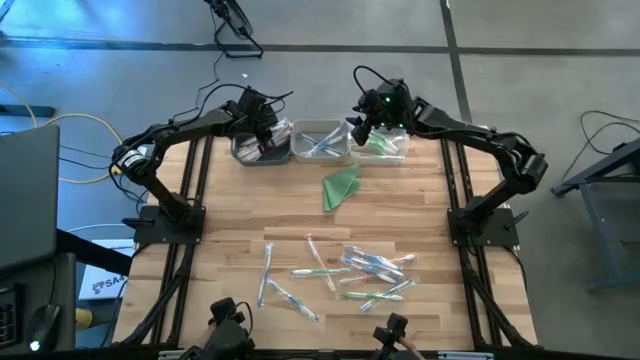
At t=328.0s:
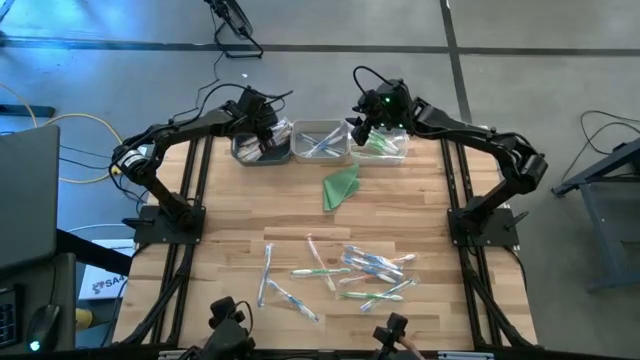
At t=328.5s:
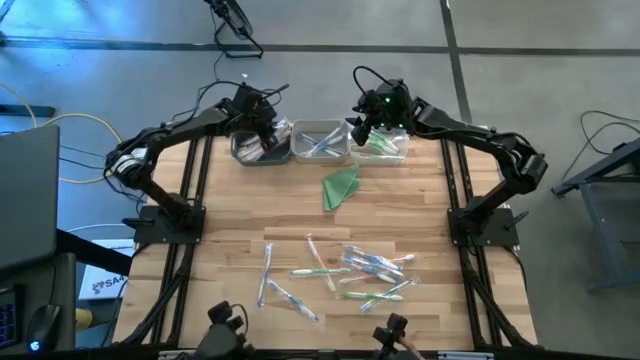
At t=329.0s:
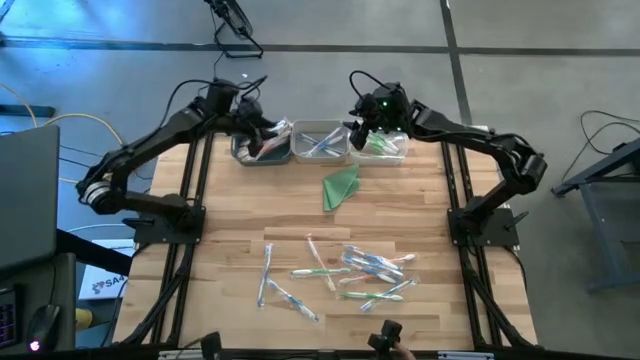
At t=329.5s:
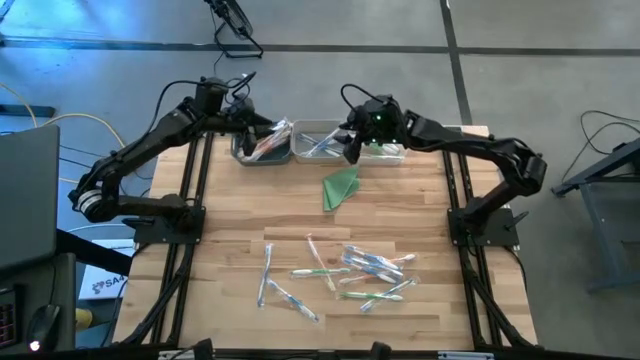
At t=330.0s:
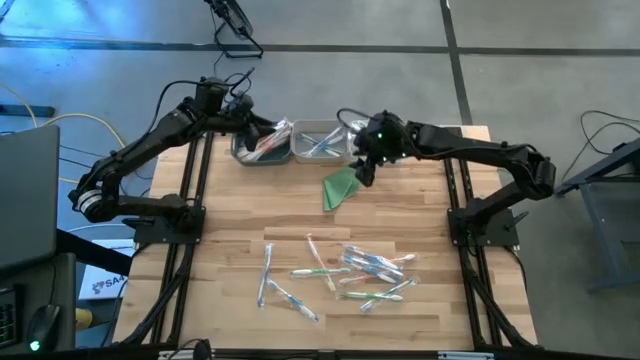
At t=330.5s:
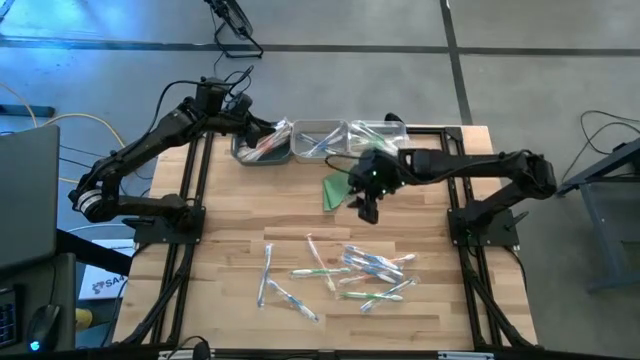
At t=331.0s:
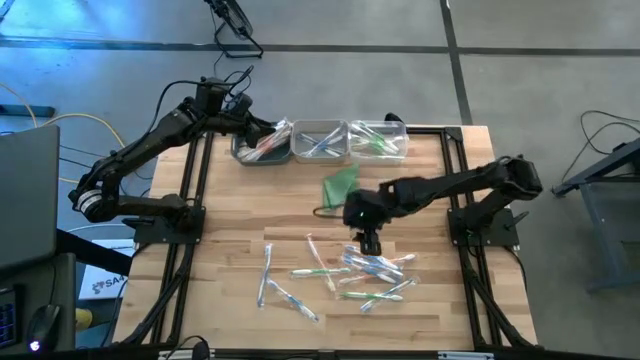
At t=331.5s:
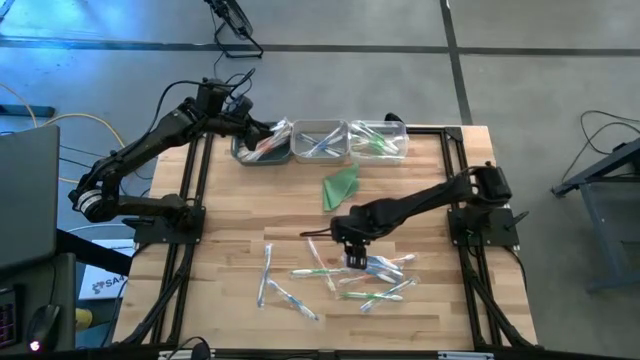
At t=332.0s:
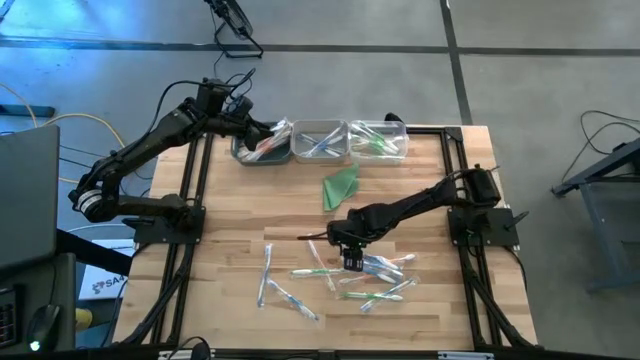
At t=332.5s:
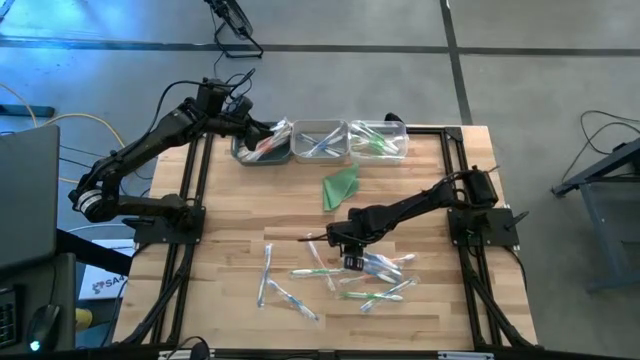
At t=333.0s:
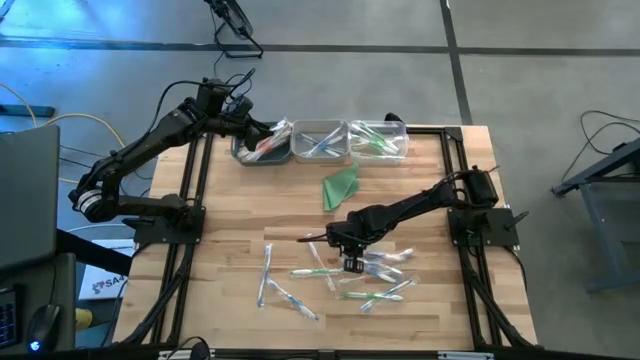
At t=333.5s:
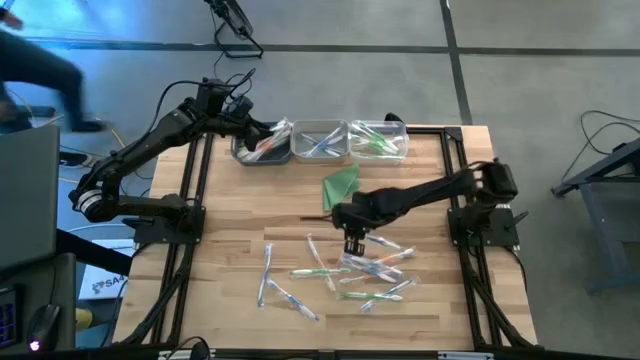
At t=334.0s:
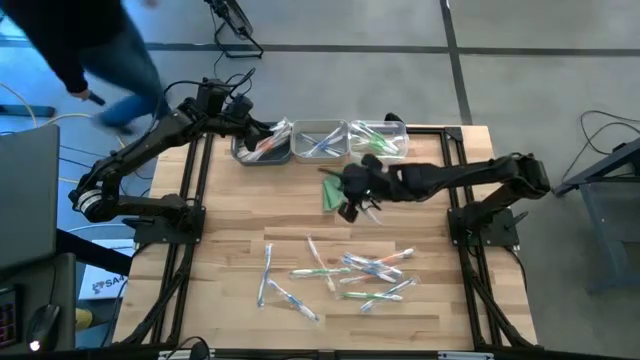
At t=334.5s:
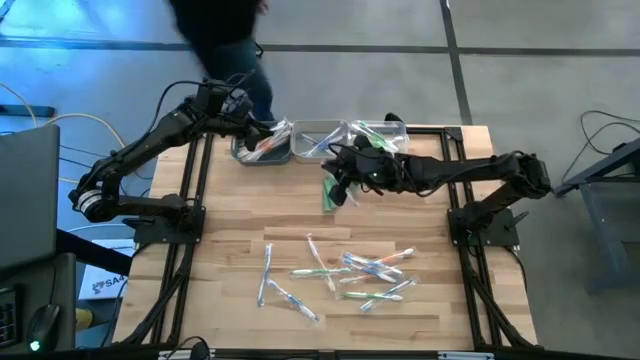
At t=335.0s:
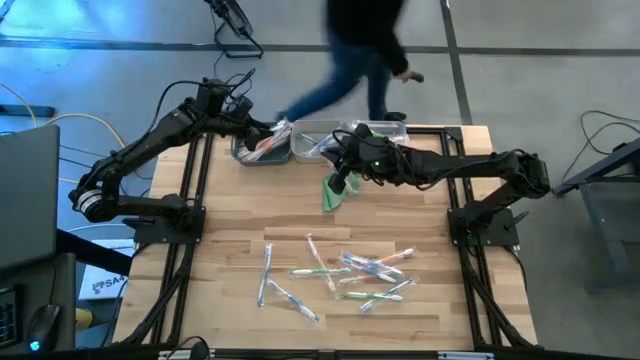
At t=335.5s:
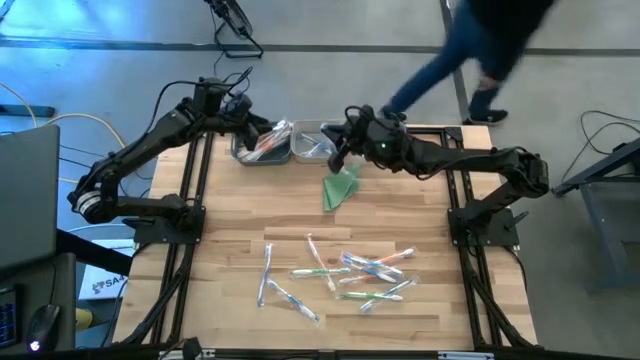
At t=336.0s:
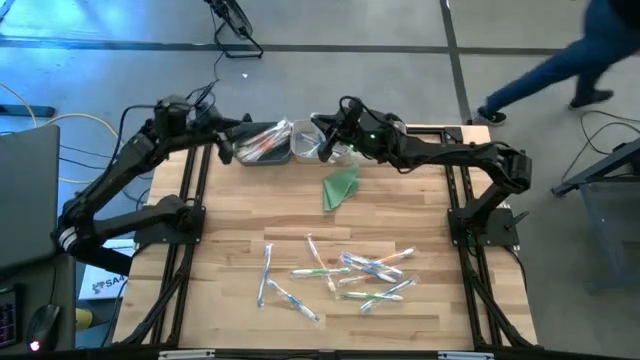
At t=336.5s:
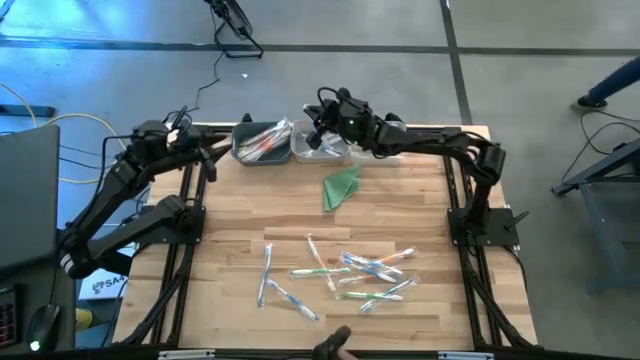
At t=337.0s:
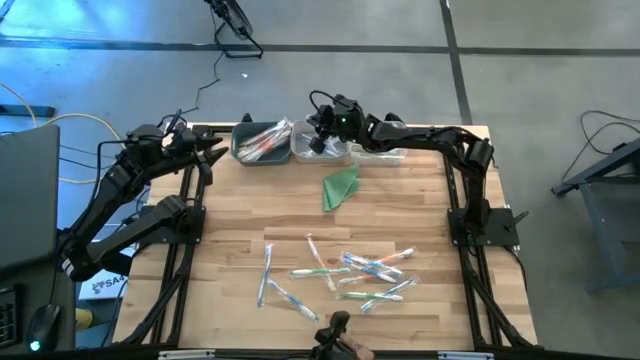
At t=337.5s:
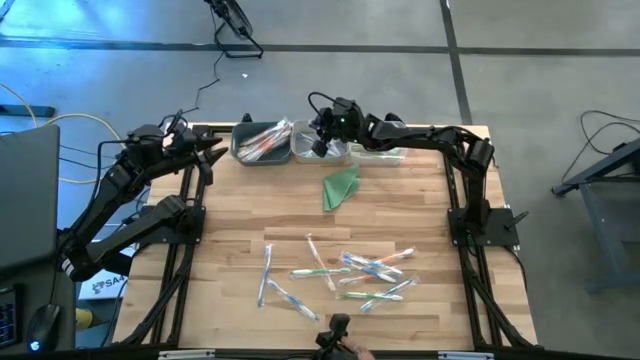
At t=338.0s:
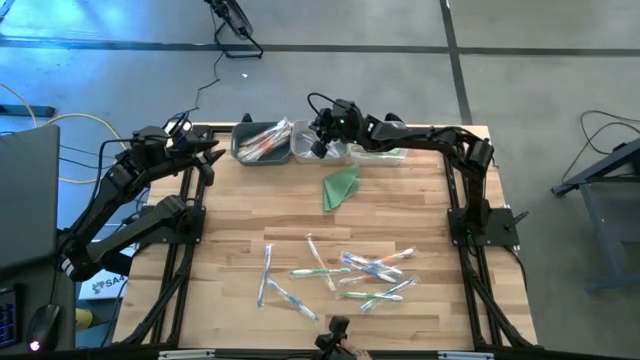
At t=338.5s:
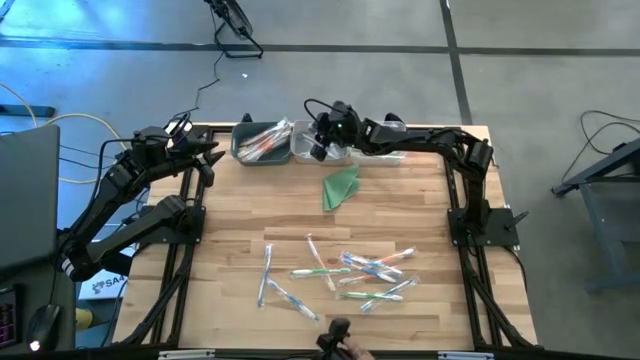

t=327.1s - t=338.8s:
Task: Pick & Place Toothbrushes
Put the blue toothbrush into the gray bin

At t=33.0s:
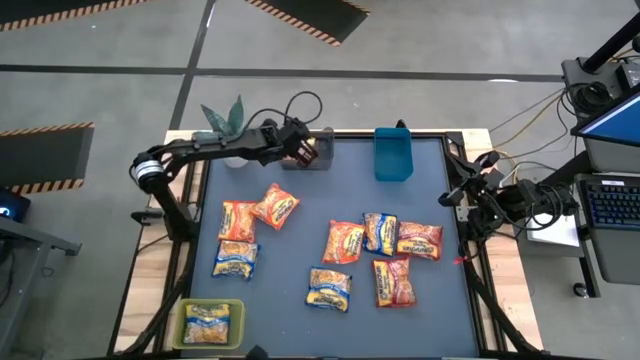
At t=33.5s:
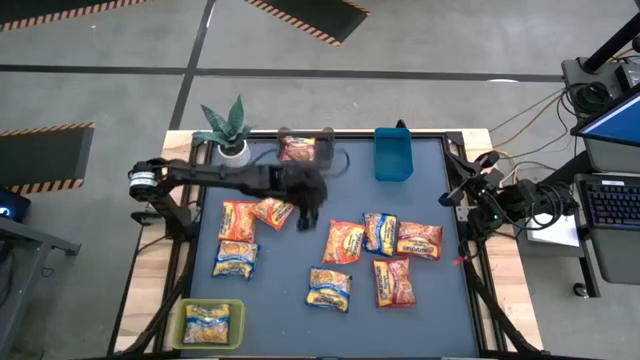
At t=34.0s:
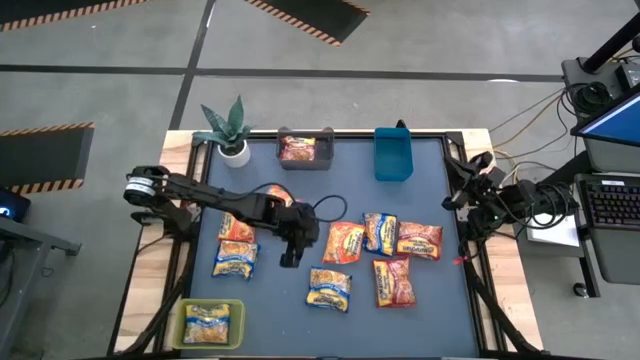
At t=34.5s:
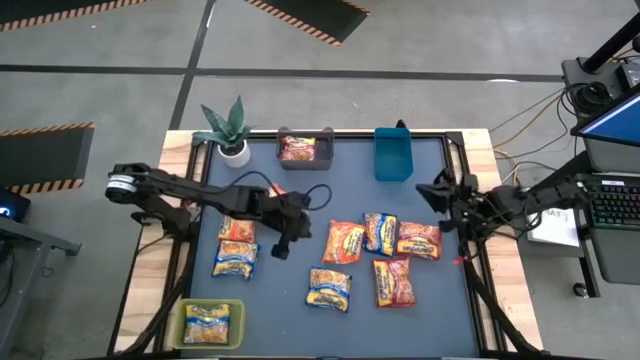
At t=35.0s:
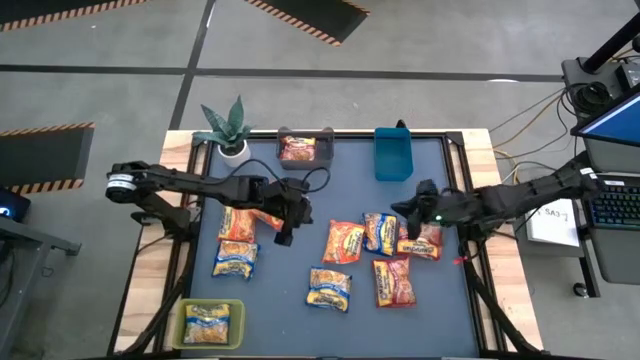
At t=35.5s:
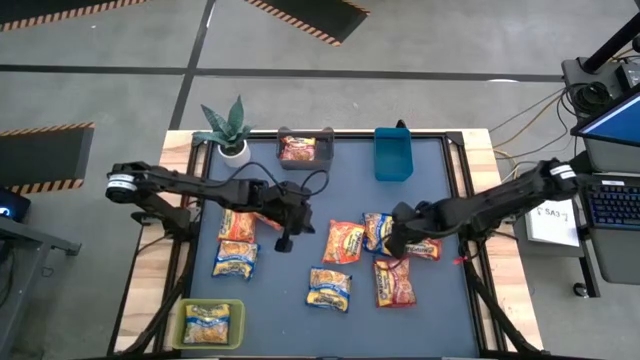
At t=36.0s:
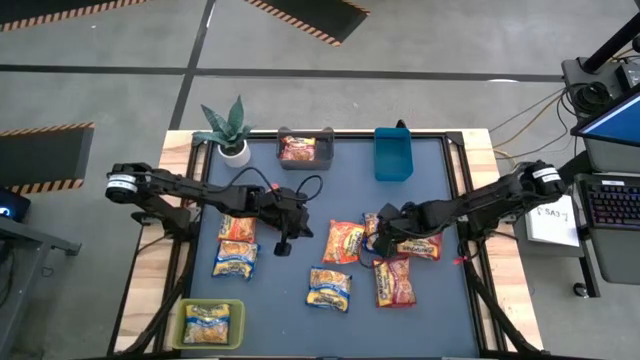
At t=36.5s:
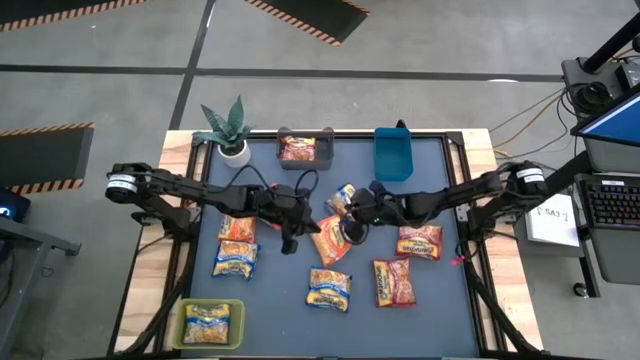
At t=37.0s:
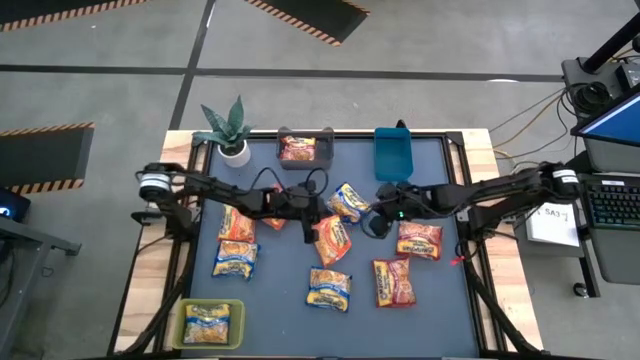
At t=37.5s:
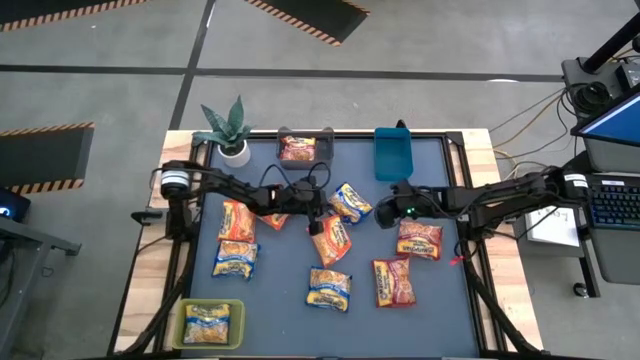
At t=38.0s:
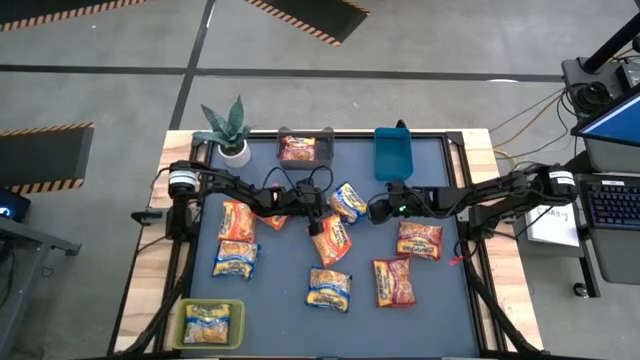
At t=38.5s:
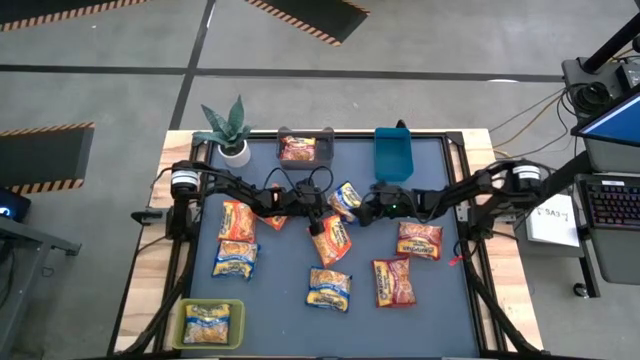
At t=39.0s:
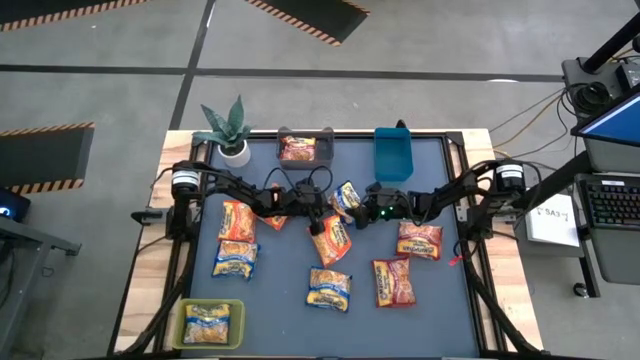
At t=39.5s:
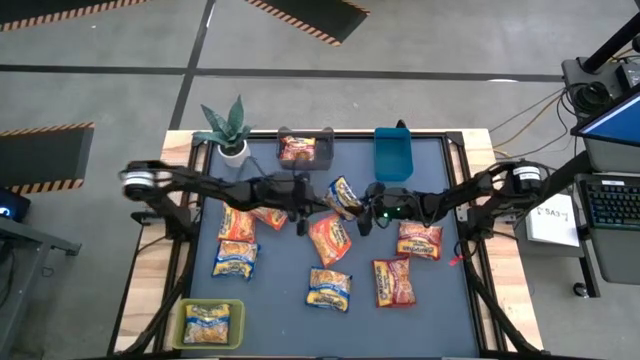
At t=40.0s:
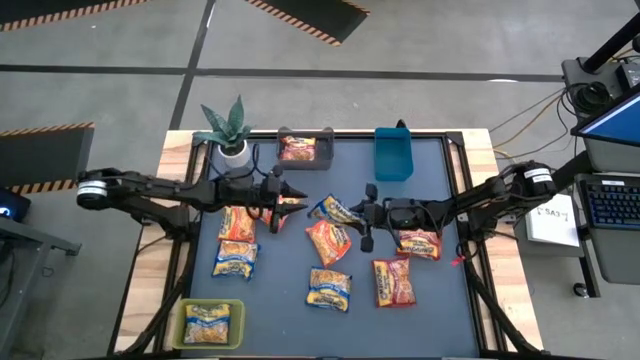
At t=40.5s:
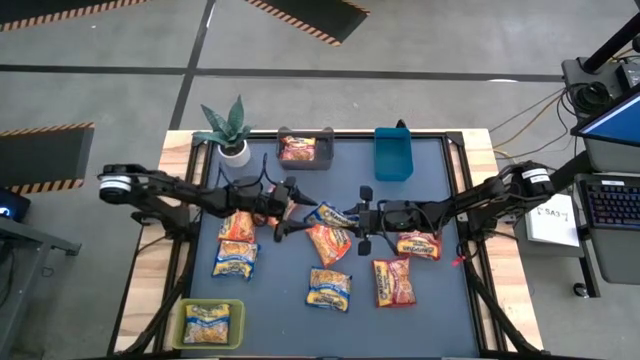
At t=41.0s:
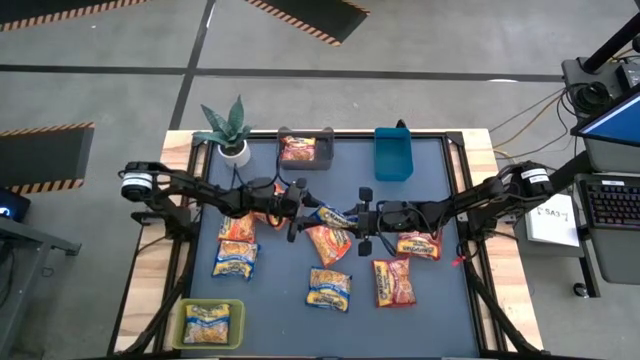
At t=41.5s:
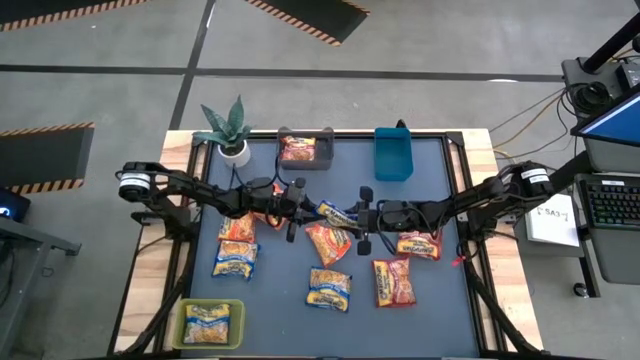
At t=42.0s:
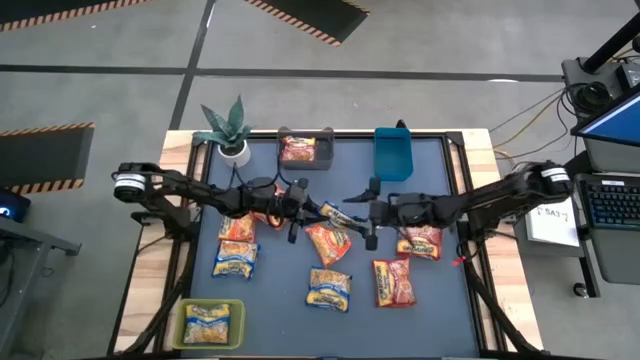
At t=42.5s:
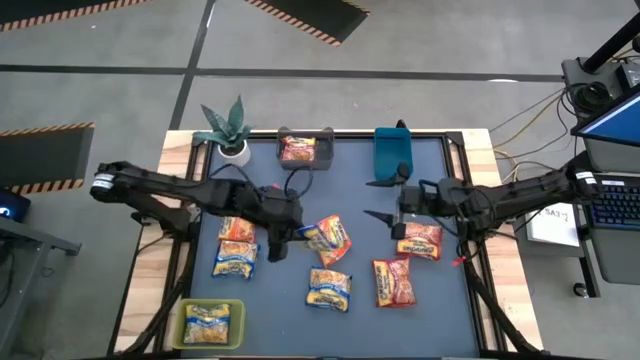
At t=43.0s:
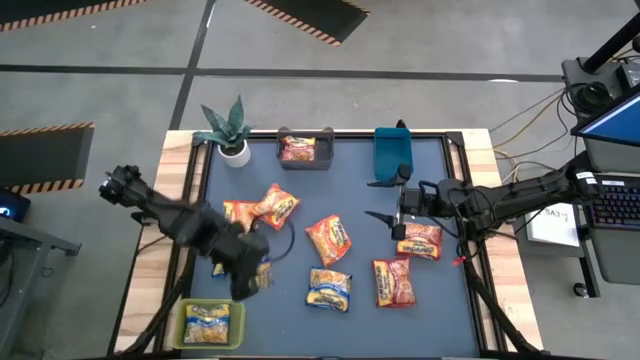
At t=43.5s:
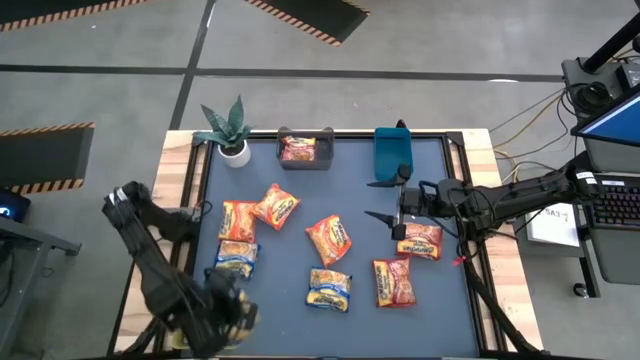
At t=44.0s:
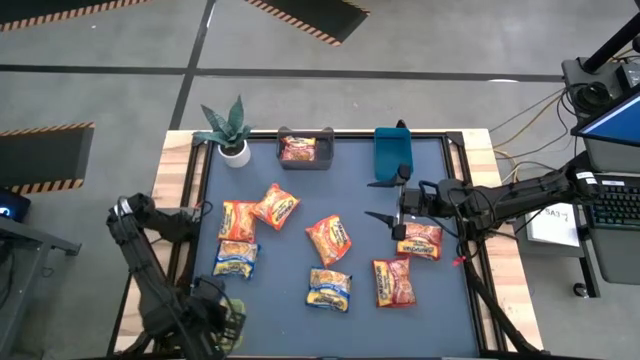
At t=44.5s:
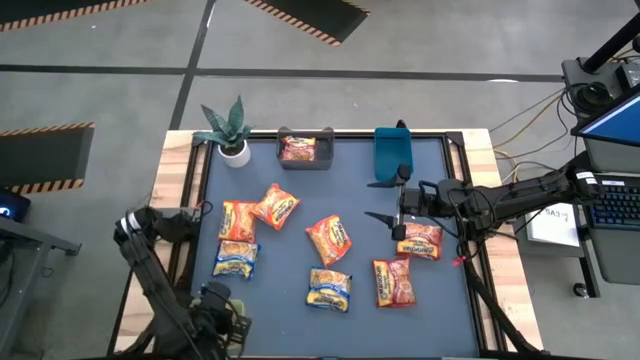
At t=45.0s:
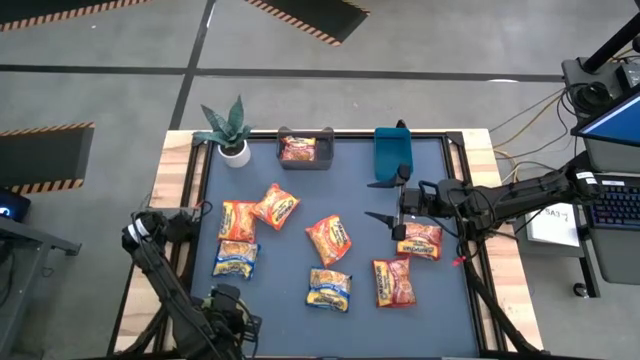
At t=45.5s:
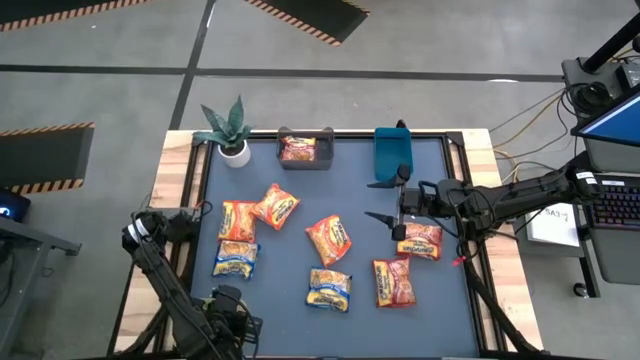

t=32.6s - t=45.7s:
Task: Sort Maruchan noodles
Put the blue noodle pack into the yellow bin
